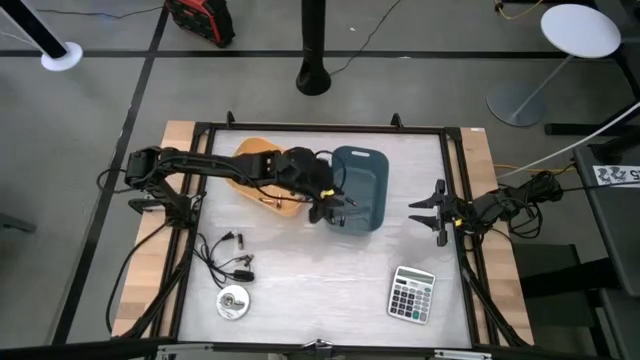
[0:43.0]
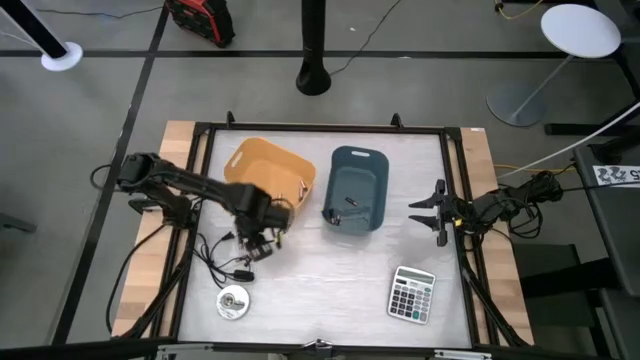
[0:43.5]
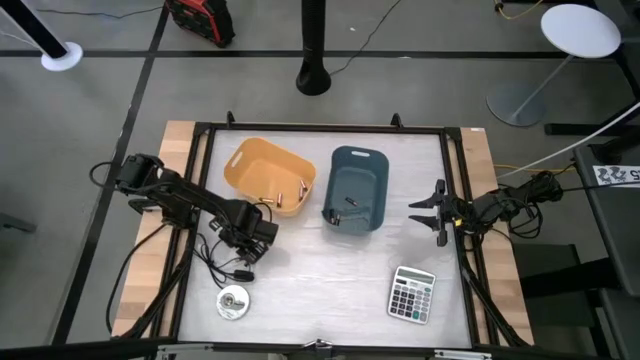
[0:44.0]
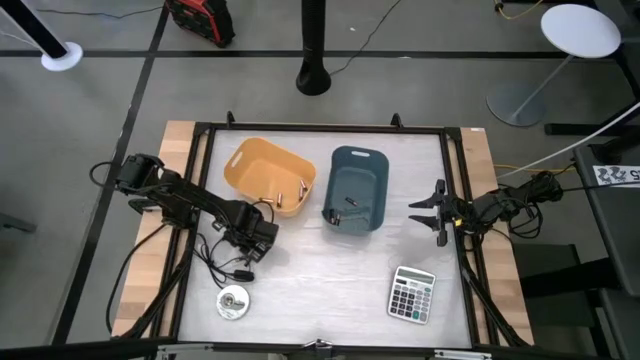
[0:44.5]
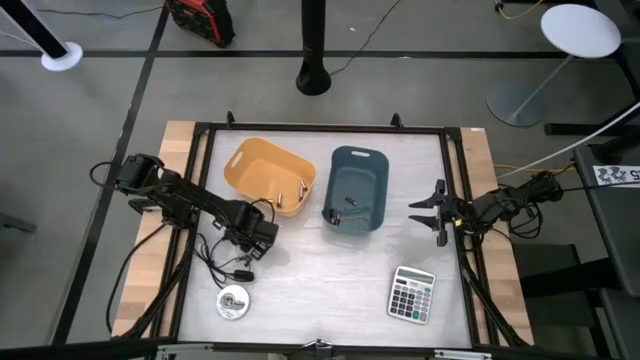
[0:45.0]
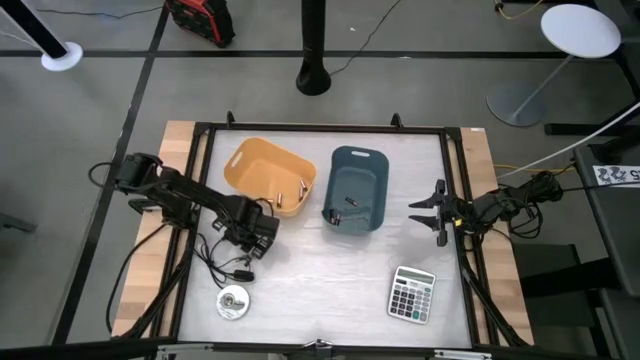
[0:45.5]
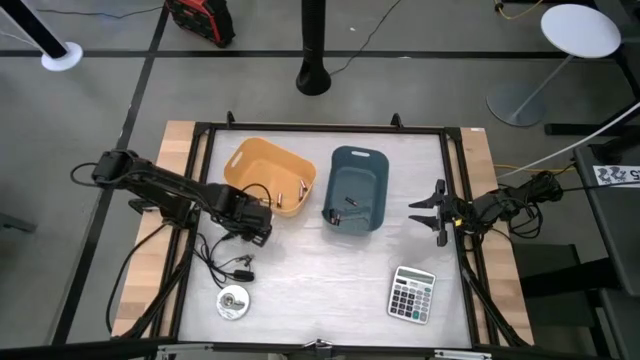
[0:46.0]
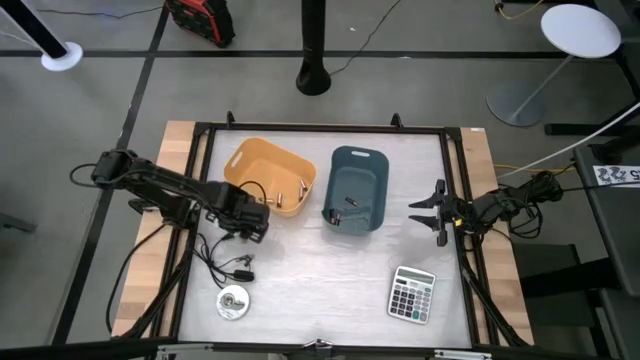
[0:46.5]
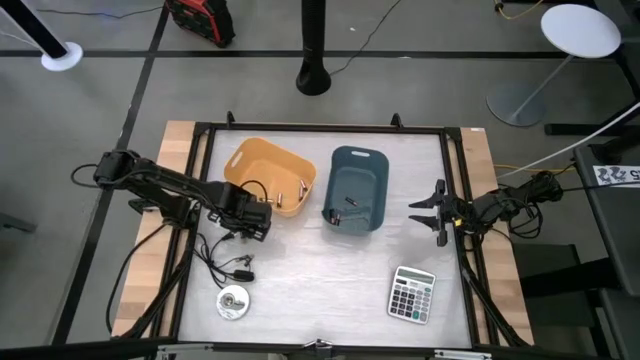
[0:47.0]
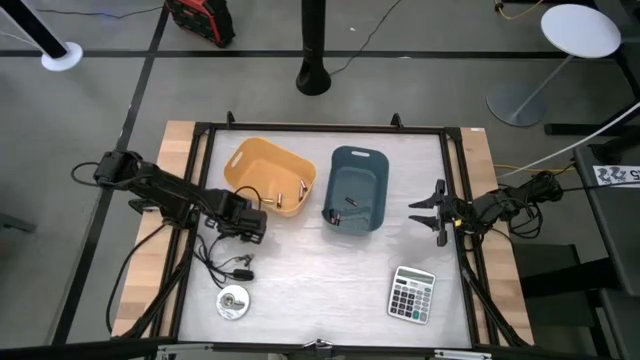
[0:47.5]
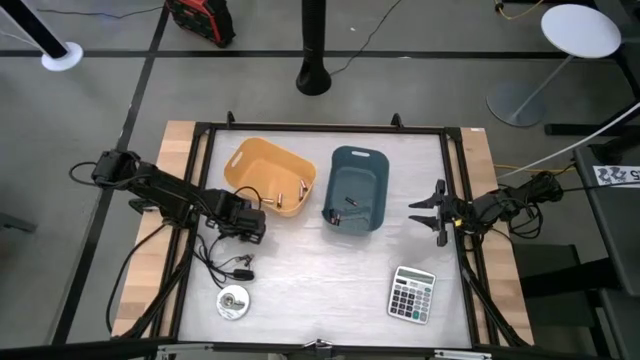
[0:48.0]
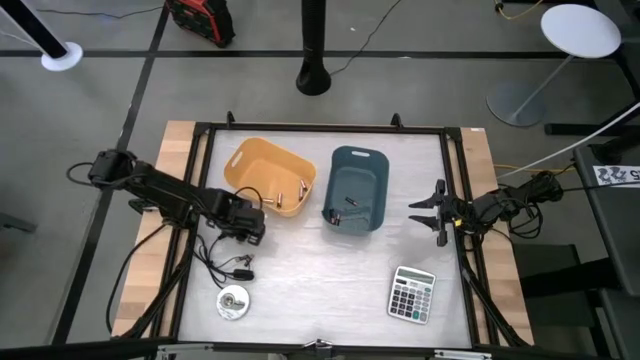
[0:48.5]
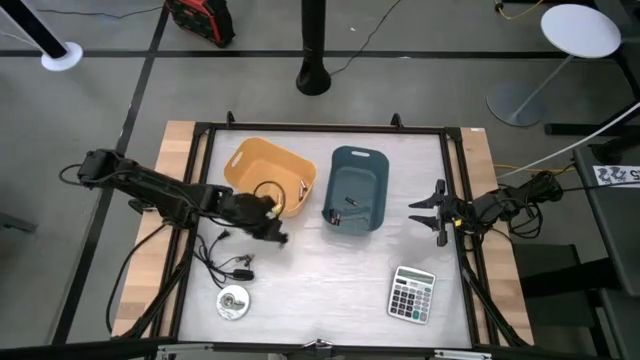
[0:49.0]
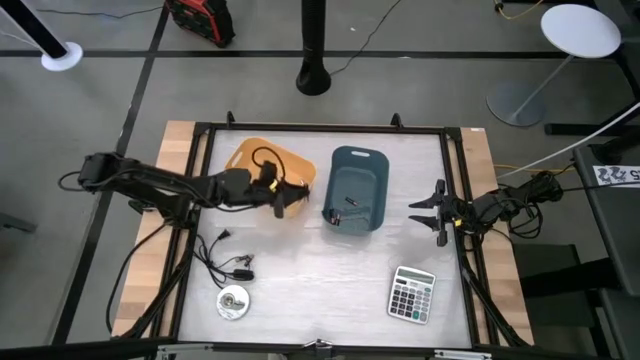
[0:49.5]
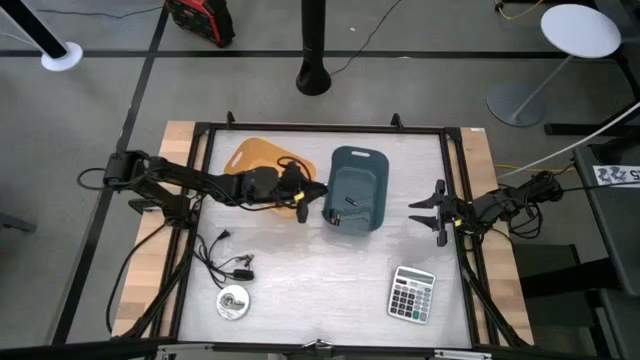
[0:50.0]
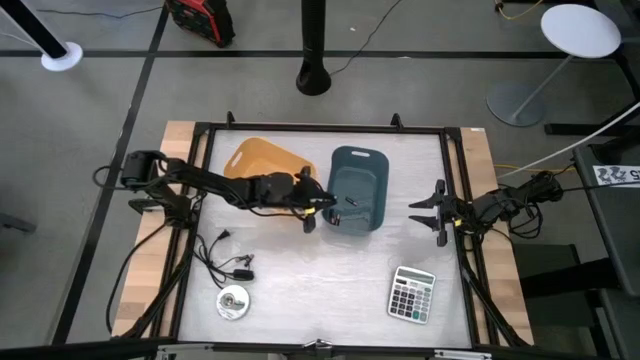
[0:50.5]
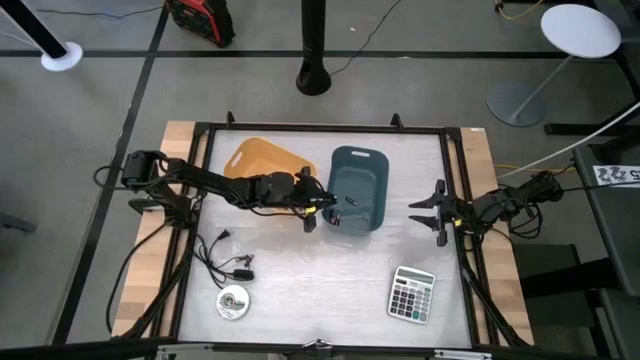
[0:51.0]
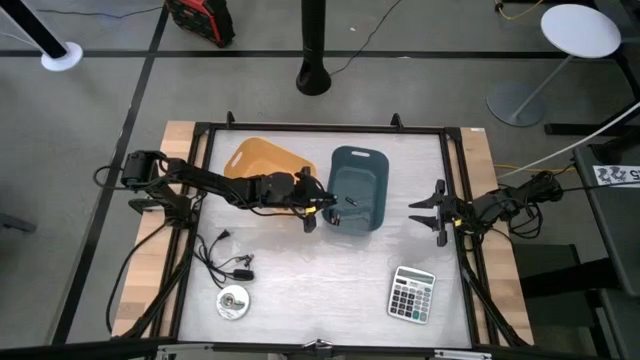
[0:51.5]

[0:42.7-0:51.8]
Task: Sort batteries
Put the black battery into the blue bin

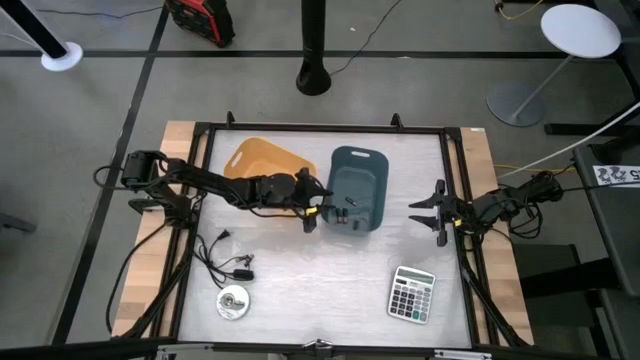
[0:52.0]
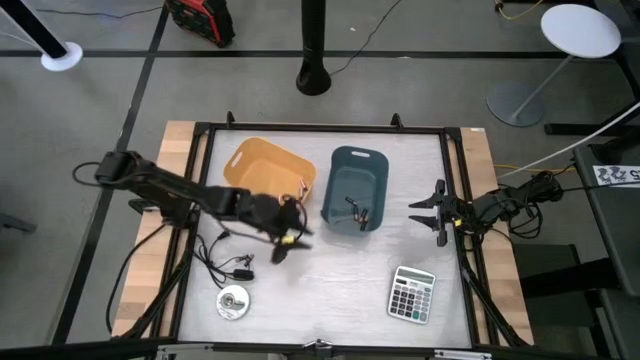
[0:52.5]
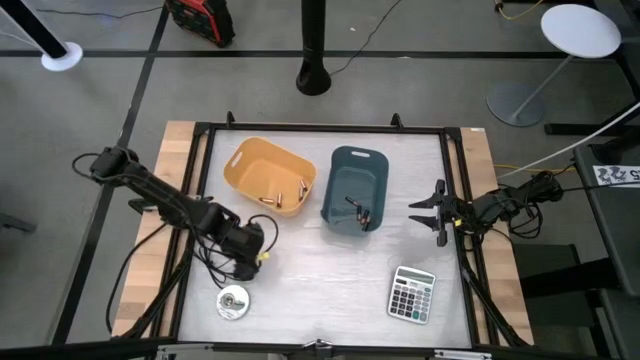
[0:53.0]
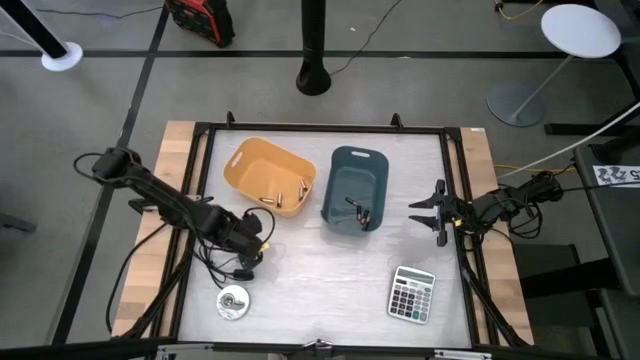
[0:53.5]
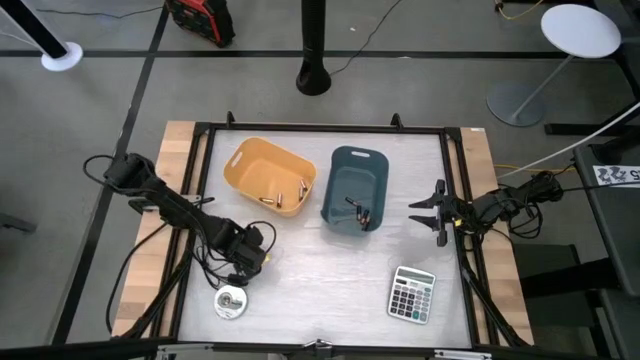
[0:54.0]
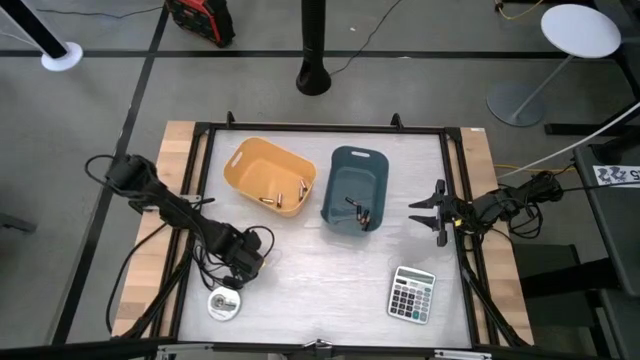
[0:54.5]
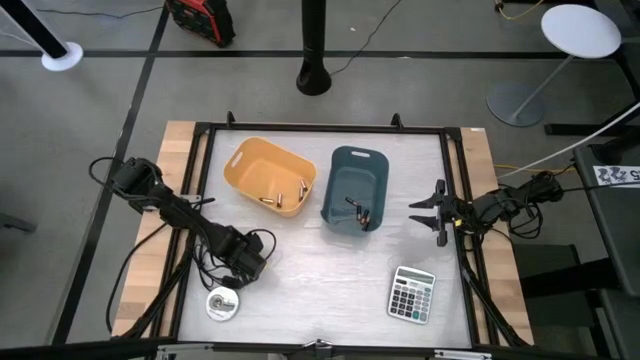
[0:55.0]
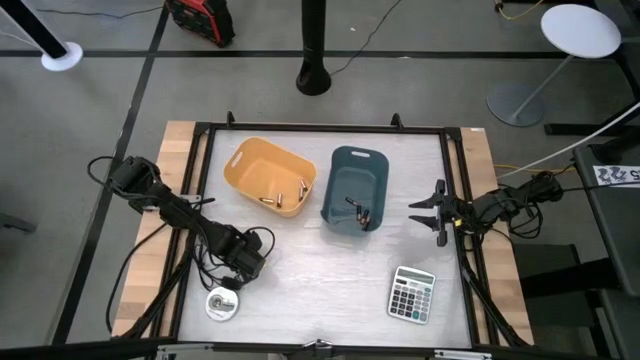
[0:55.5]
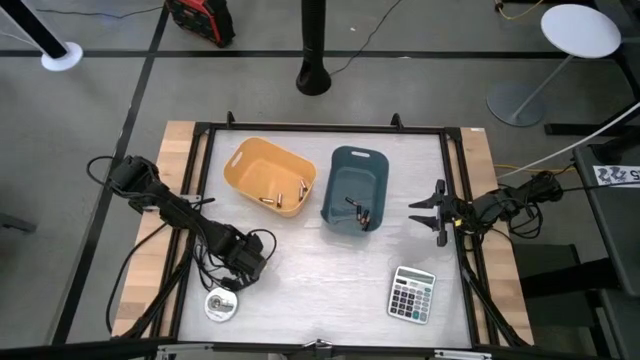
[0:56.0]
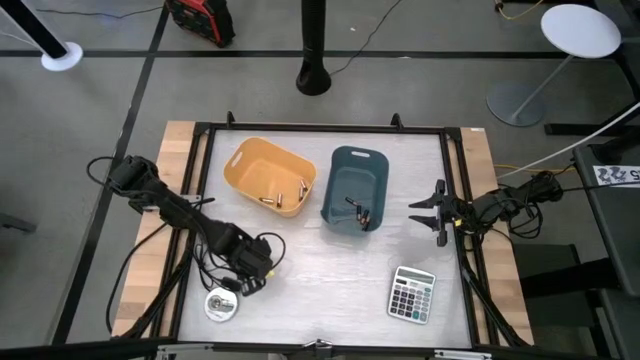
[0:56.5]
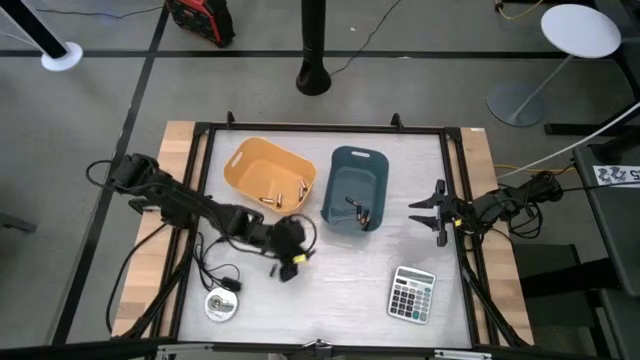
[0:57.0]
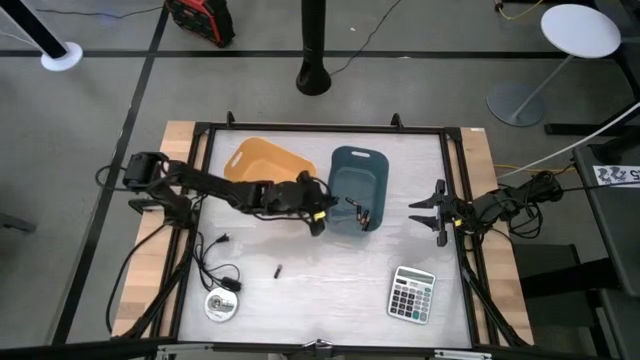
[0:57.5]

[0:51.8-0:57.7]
Put the black battery into the blue bin

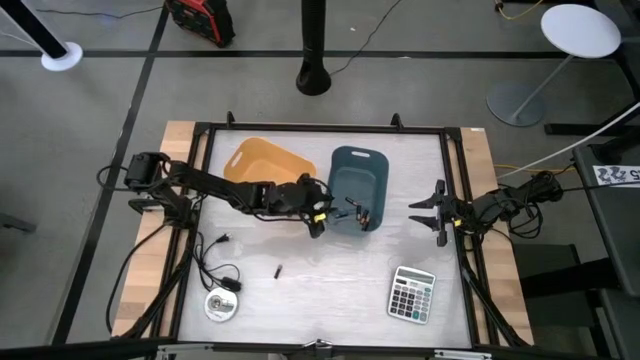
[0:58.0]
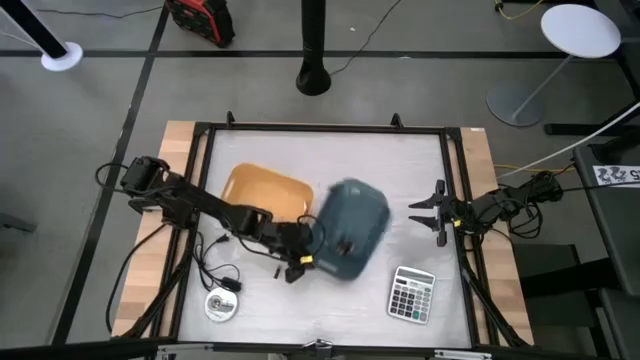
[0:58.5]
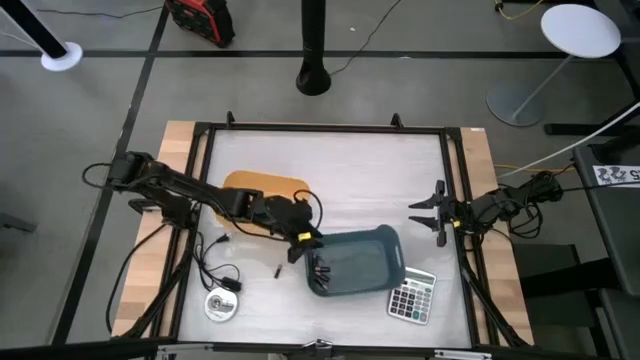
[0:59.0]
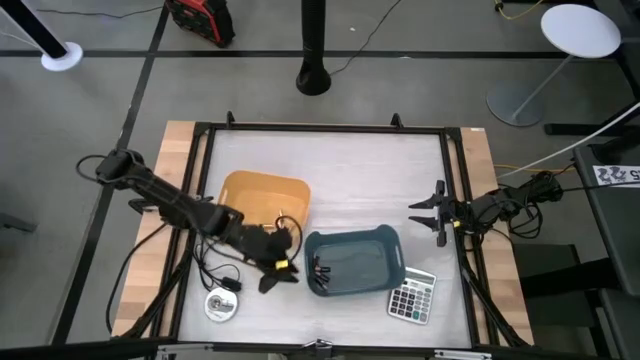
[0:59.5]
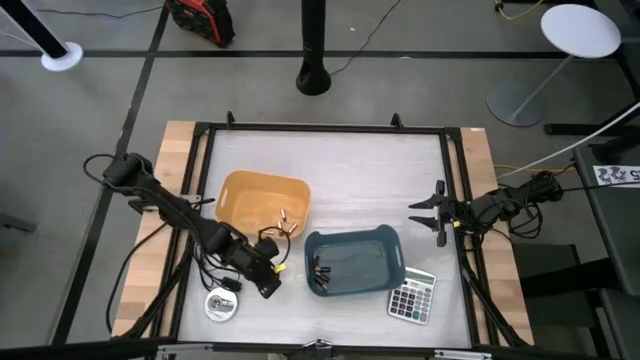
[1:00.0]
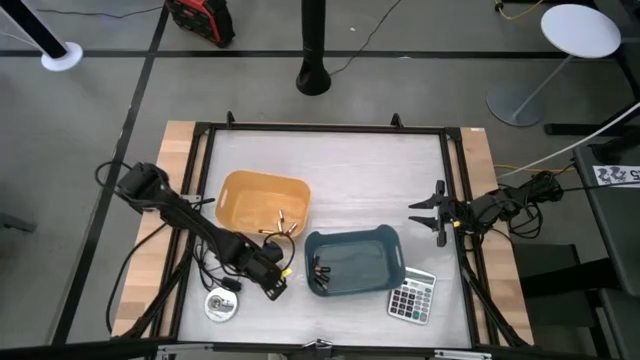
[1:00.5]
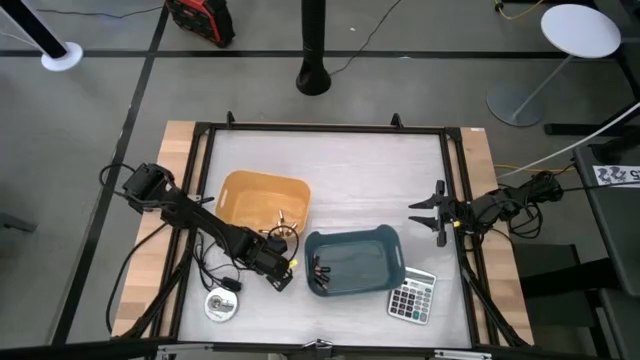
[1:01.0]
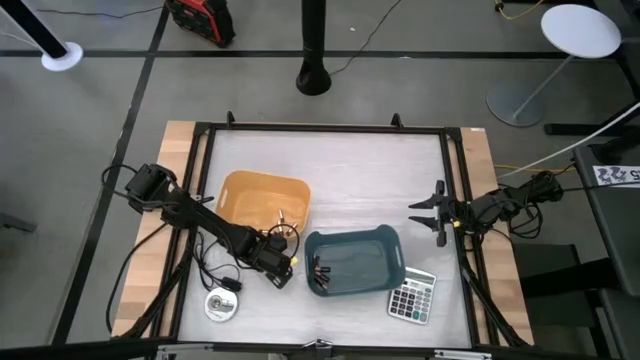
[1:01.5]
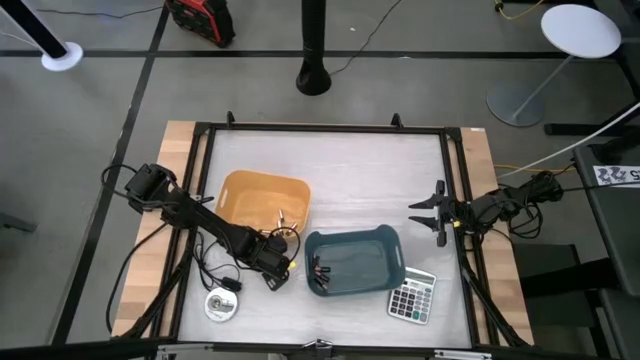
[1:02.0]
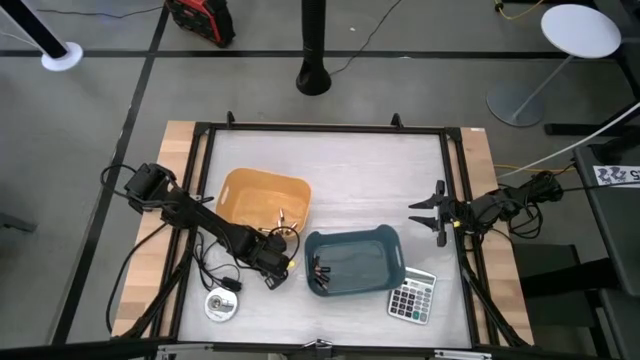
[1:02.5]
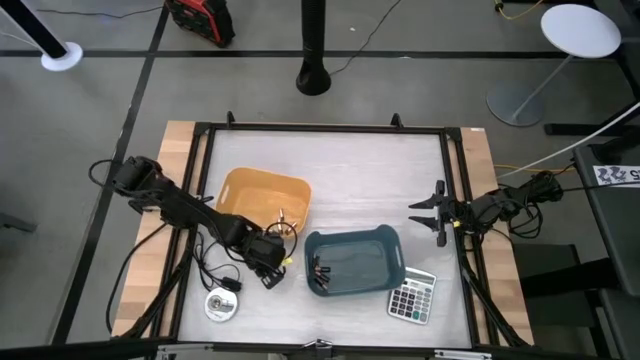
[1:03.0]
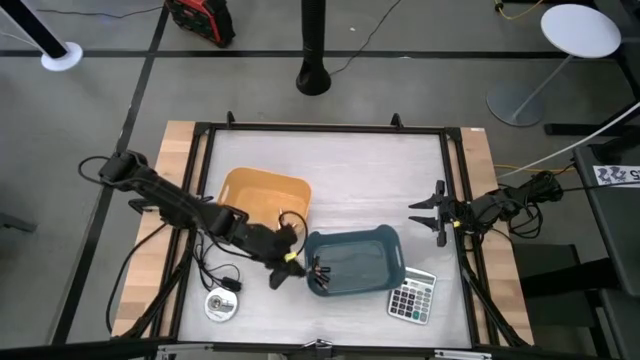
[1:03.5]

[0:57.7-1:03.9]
Put the black battery into the blue bin

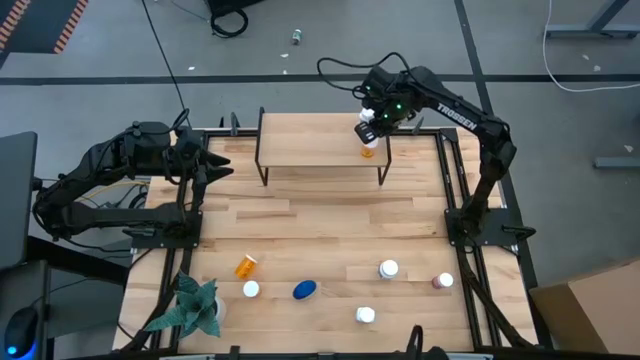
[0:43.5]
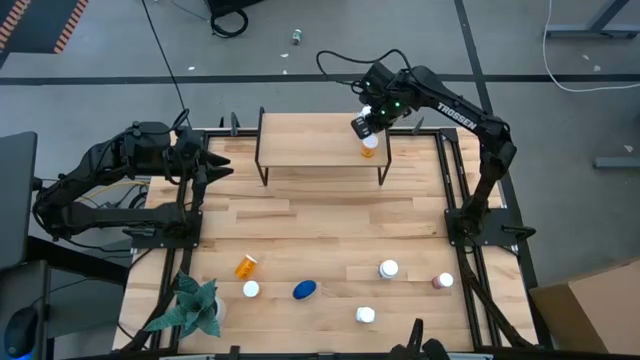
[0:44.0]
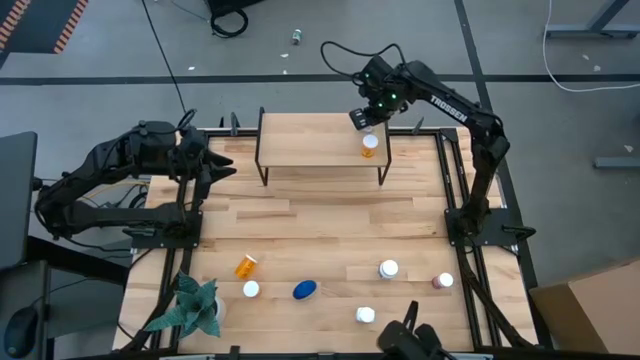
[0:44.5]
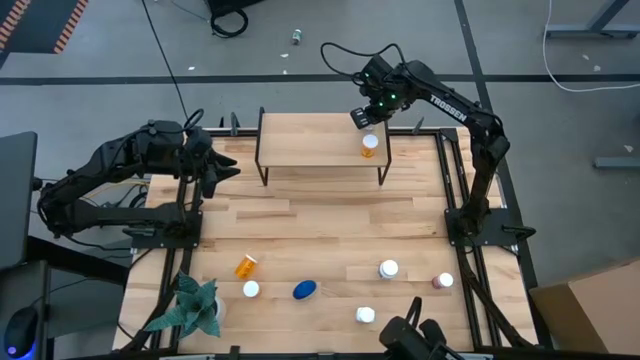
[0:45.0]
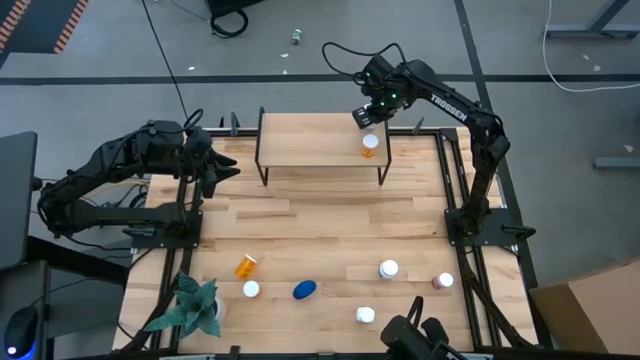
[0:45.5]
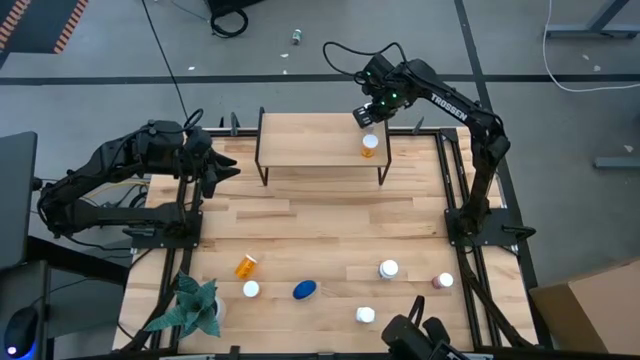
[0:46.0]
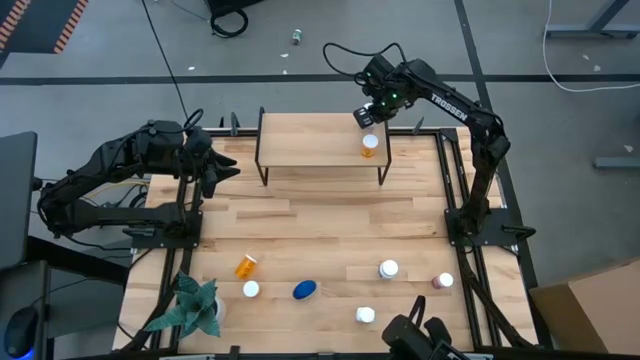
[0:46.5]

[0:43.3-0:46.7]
Task: Pick and place medicine bottles onto shelf by color
Adjust the white medicine bottle on the shelf
